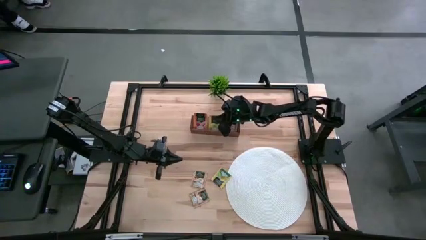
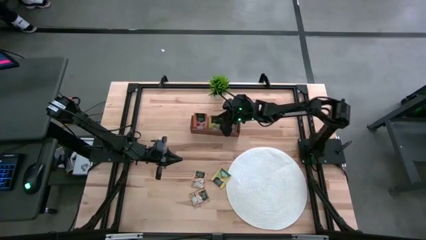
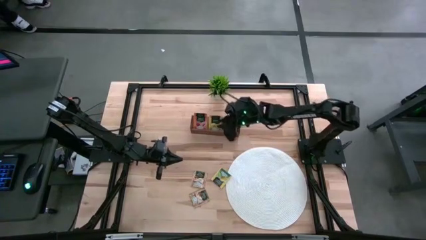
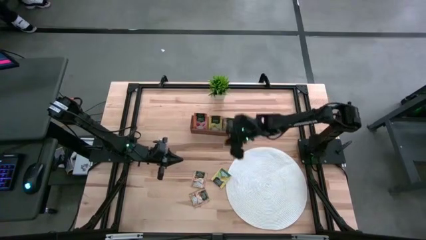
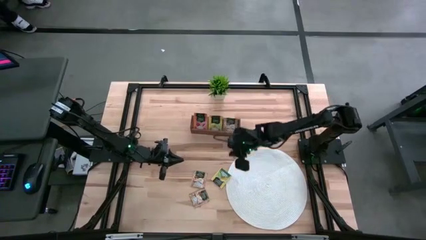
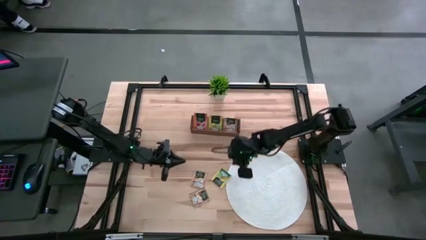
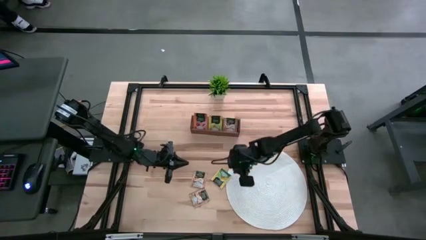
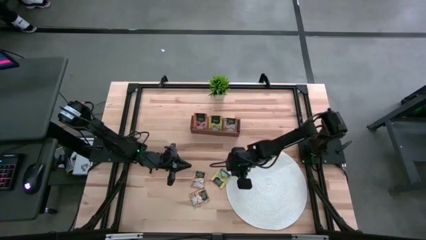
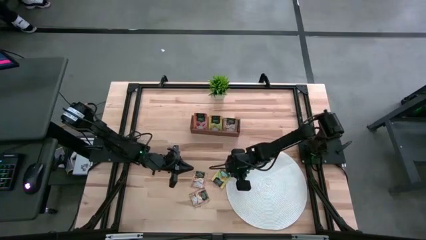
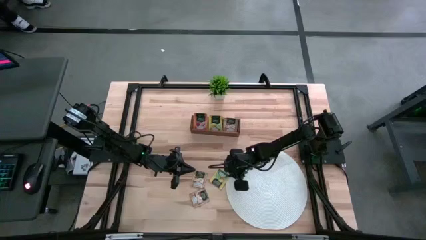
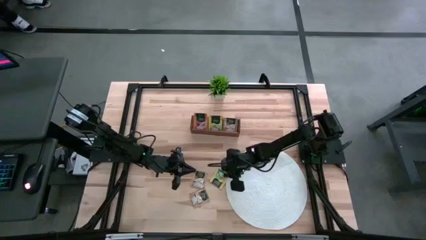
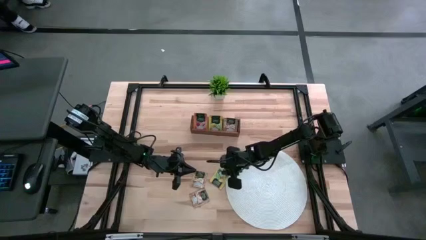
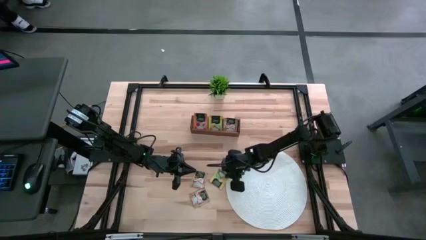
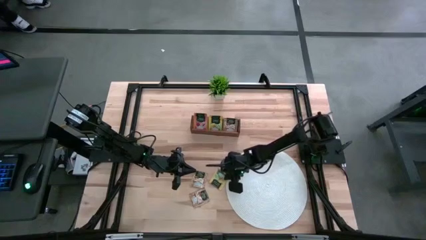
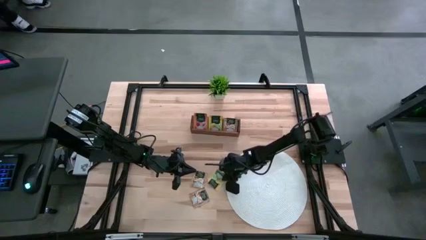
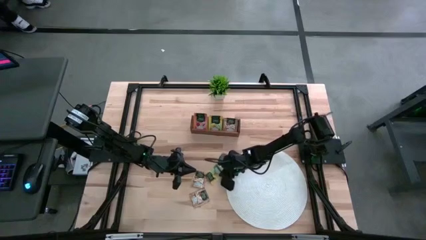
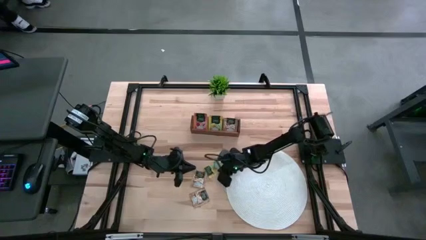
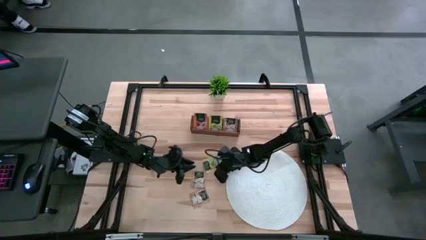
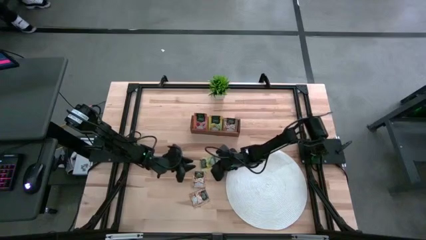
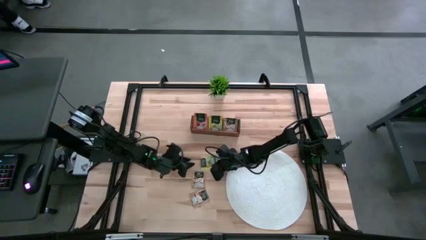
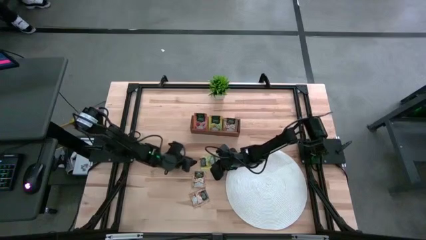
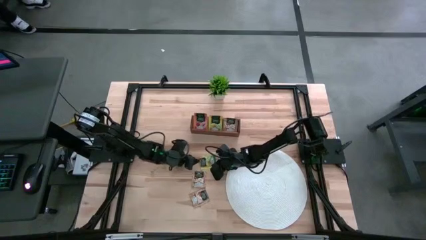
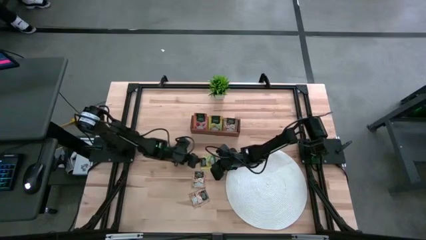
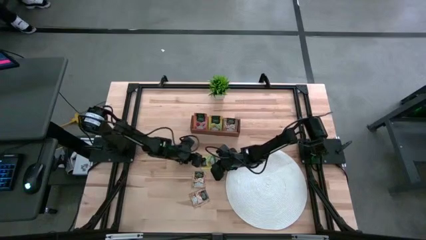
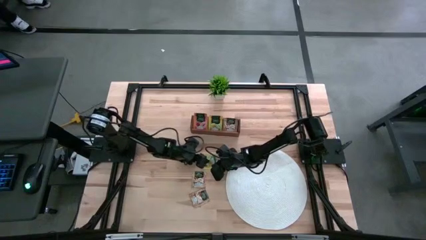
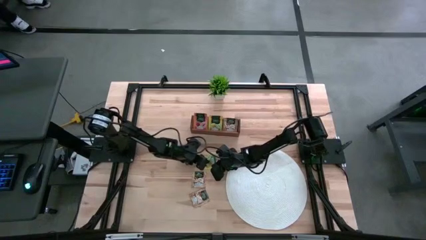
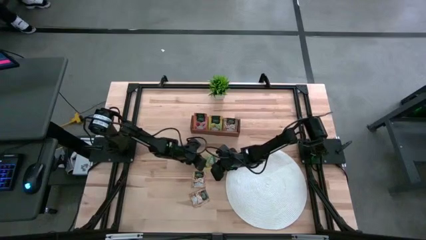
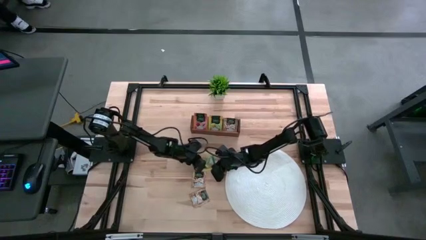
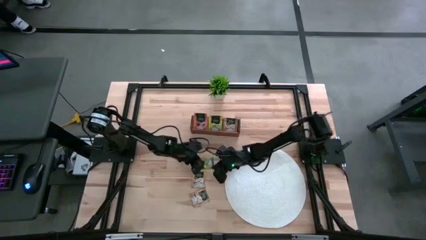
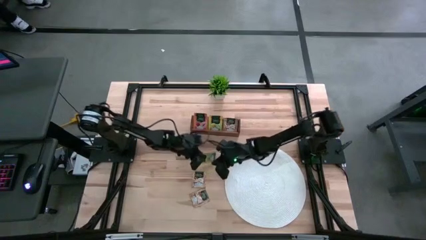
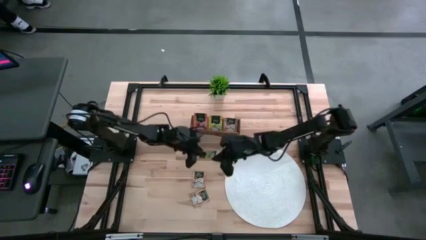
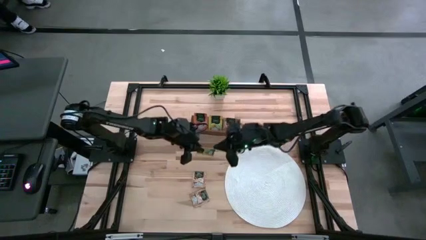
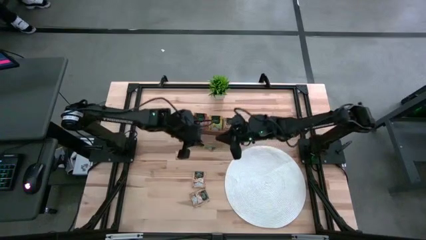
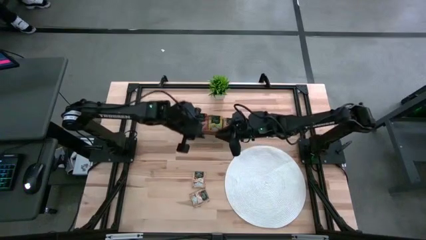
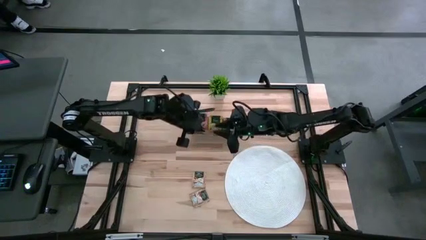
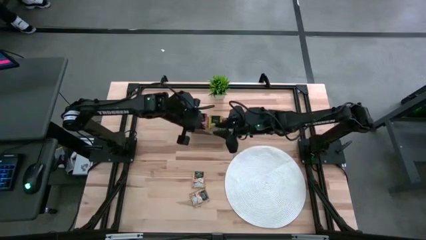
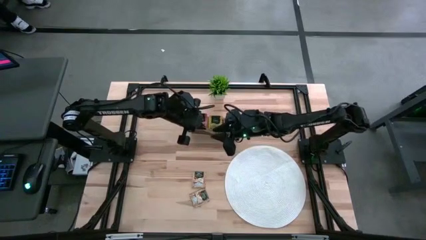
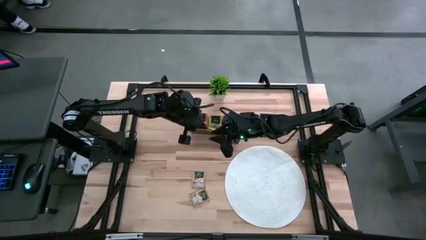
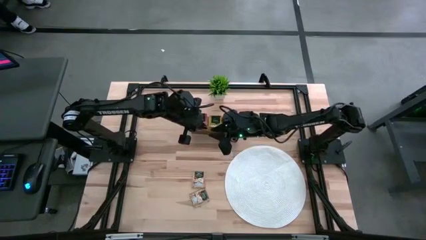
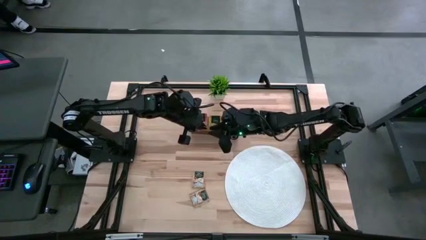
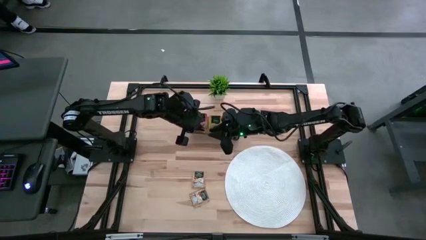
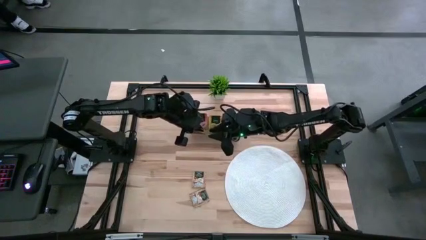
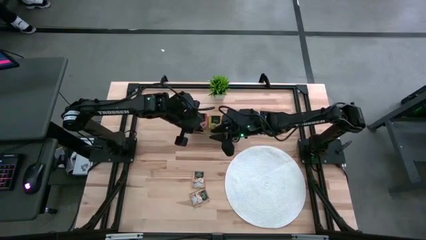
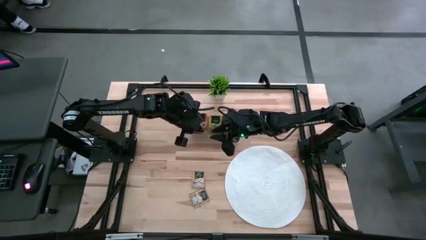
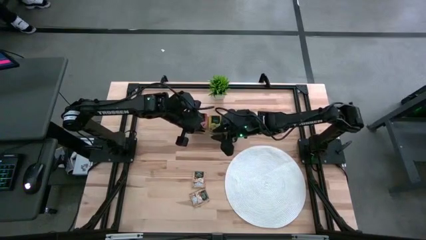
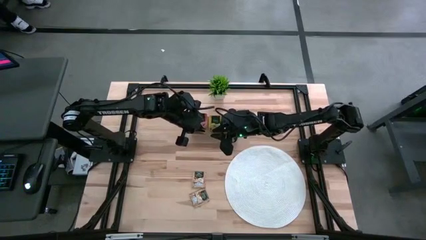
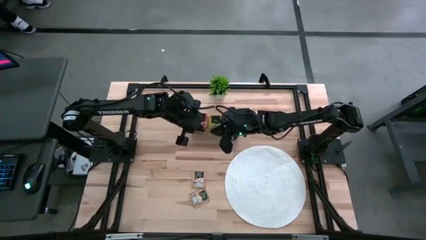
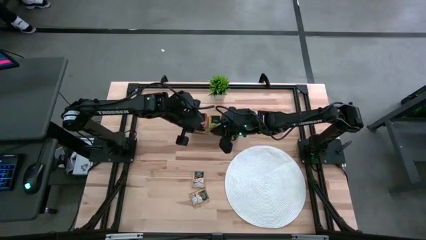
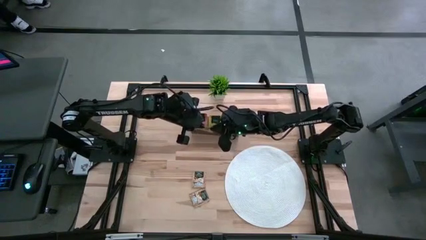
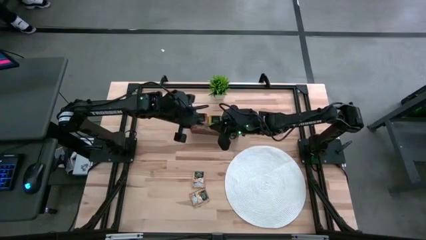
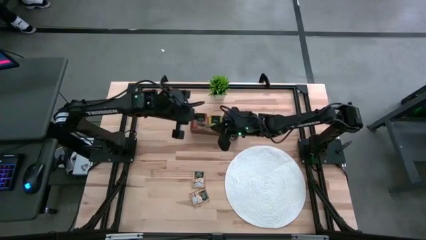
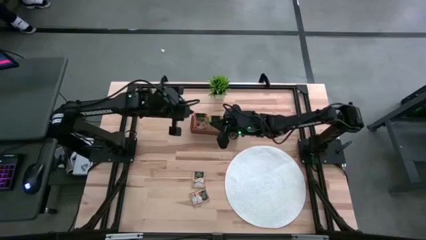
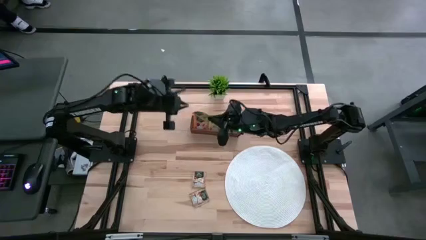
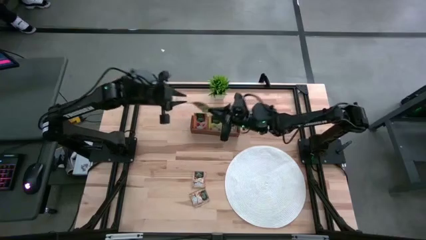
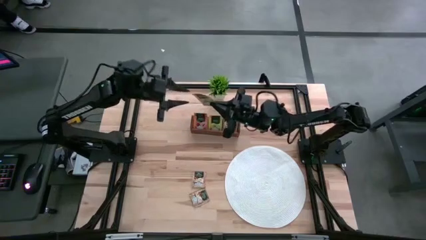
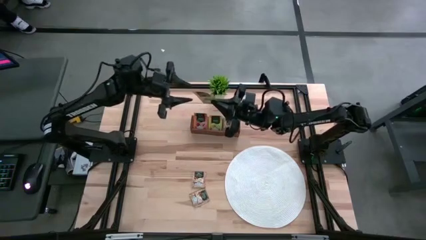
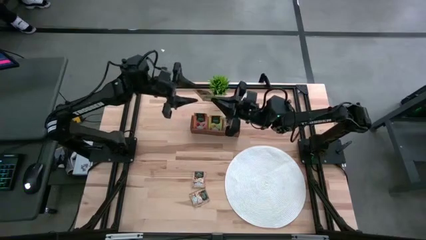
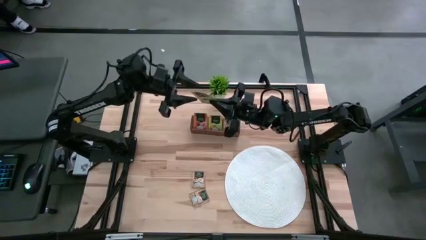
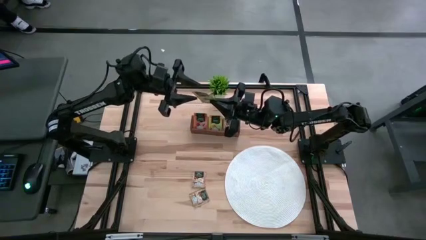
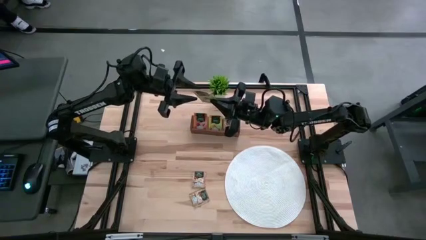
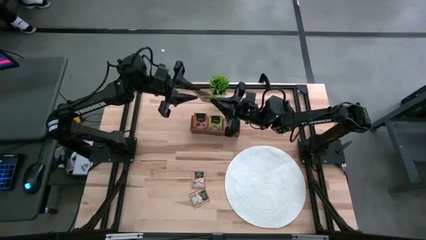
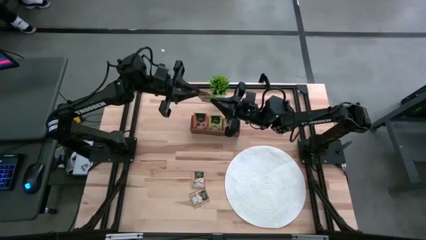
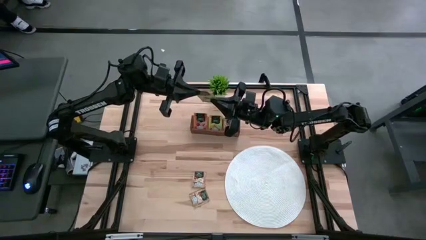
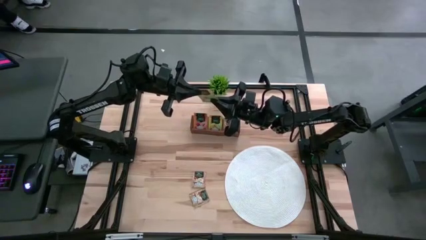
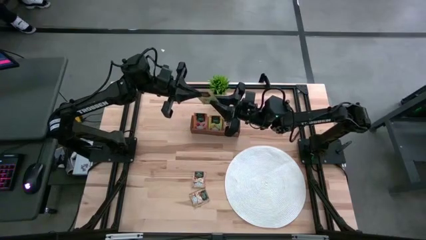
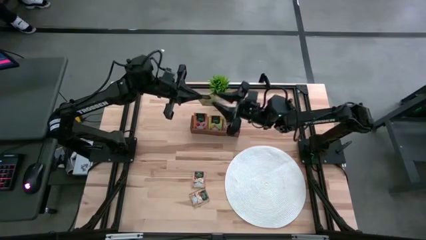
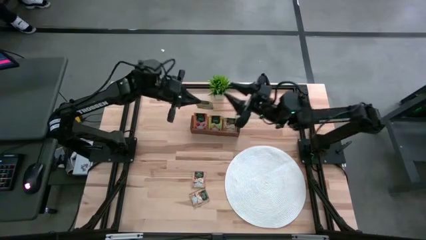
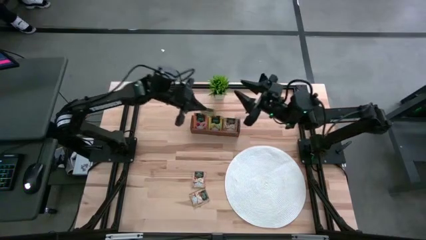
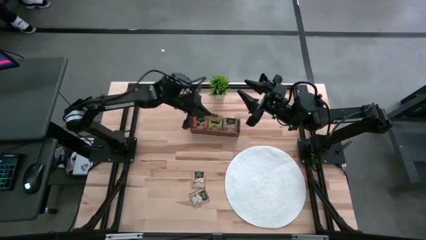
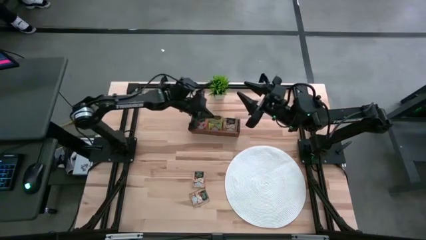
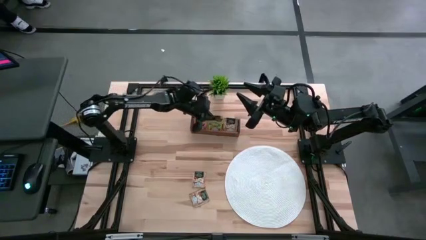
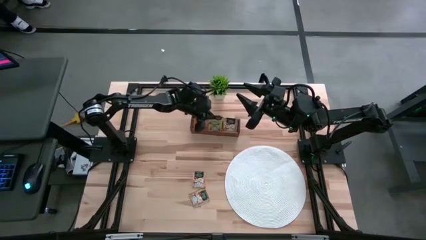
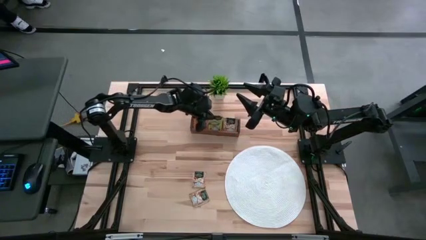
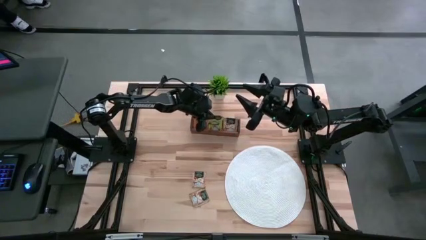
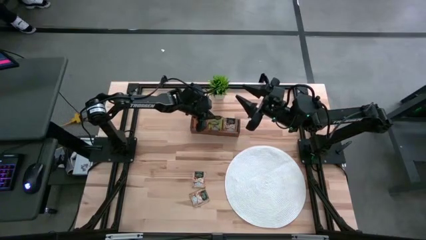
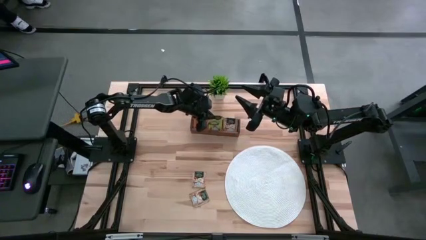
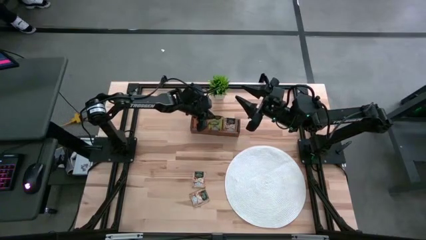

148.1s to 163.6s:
Task: Pick & Place Tea
Put the yellow tea bag into the middle section of the wooden organizer
